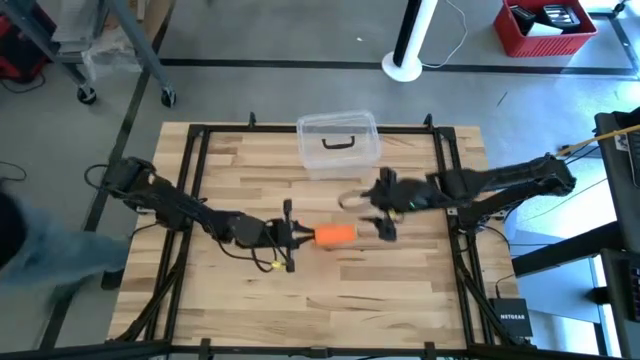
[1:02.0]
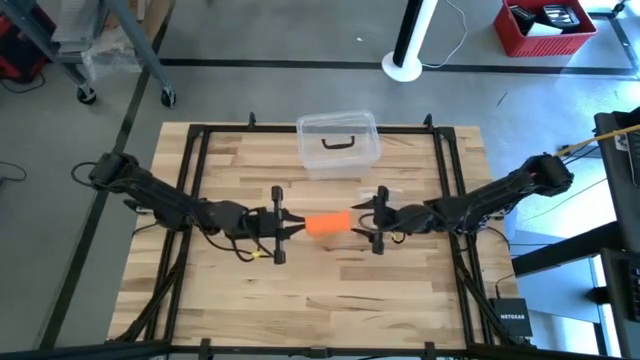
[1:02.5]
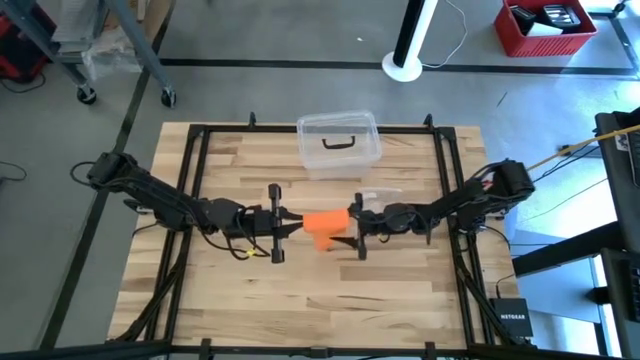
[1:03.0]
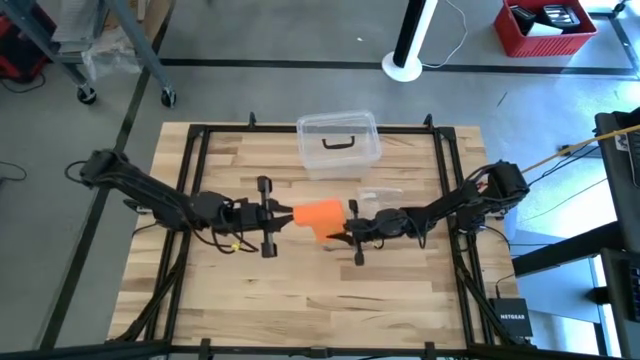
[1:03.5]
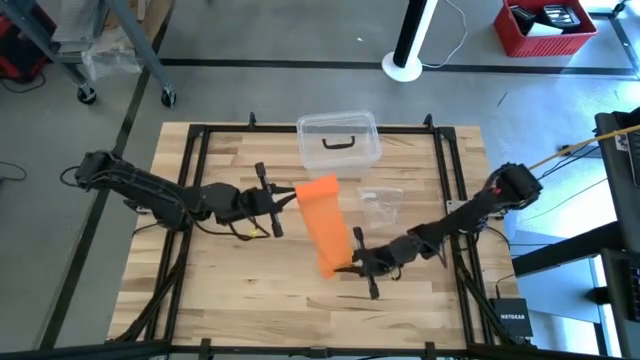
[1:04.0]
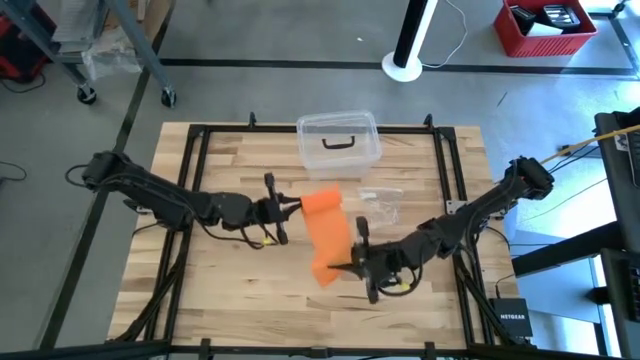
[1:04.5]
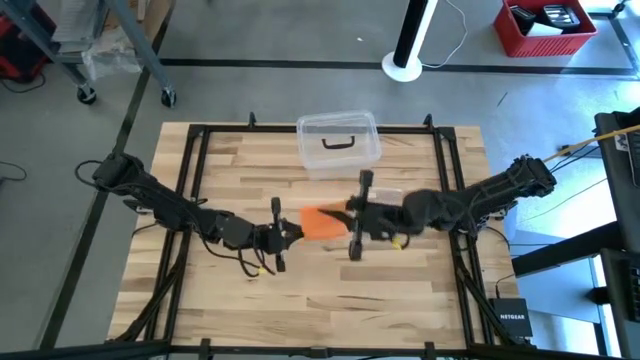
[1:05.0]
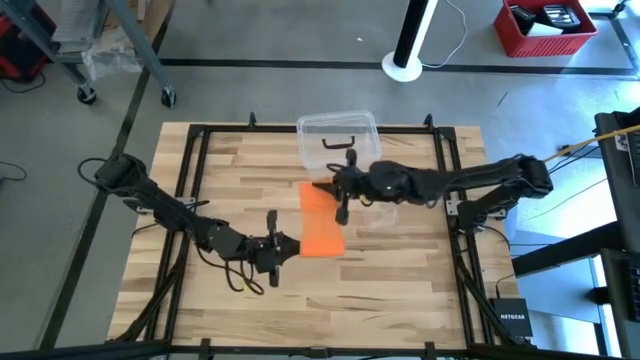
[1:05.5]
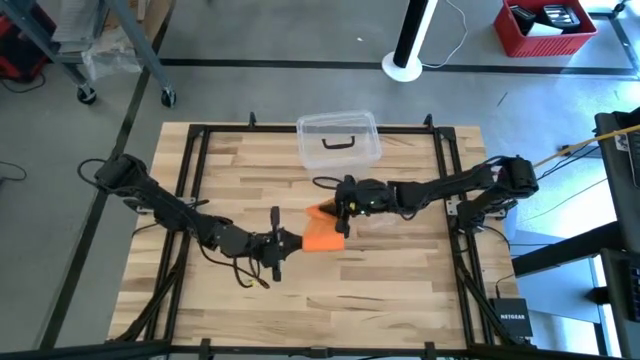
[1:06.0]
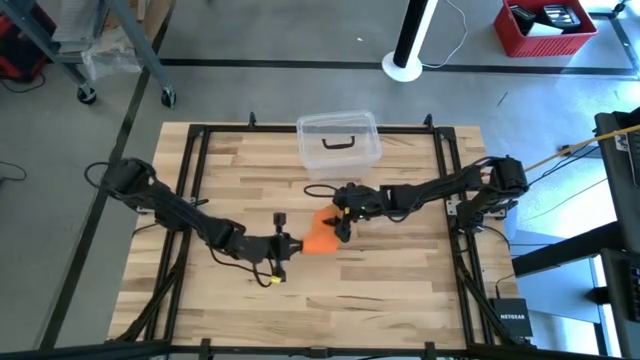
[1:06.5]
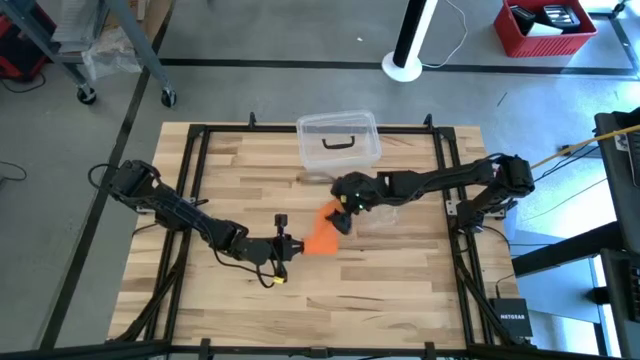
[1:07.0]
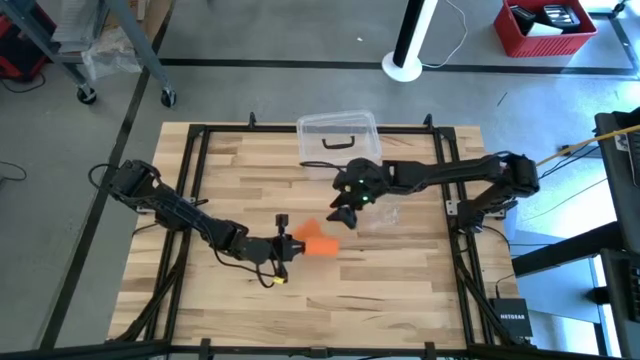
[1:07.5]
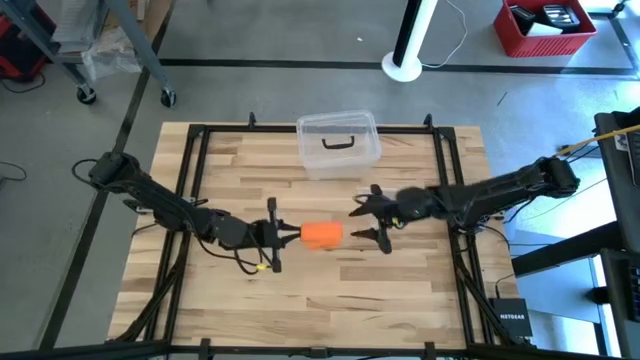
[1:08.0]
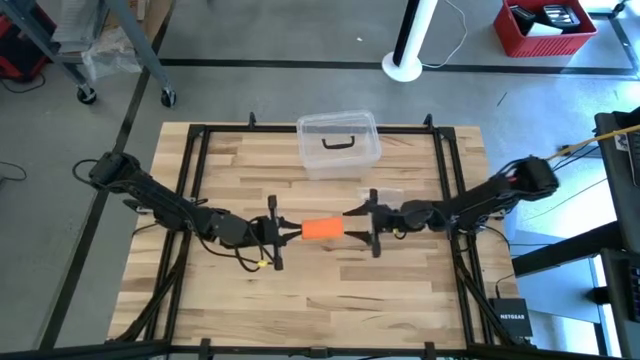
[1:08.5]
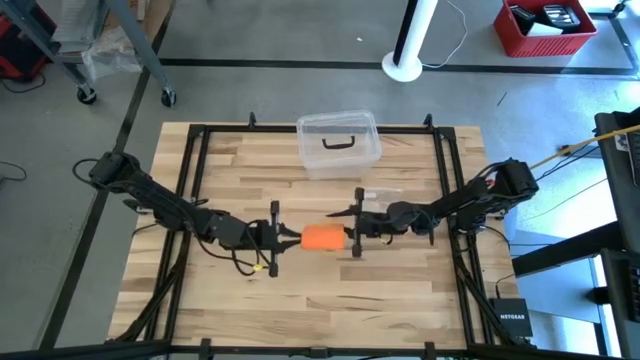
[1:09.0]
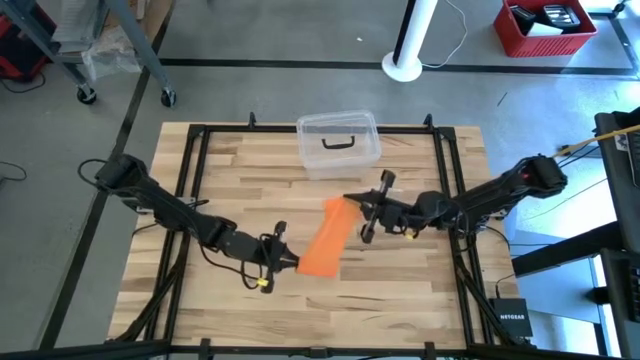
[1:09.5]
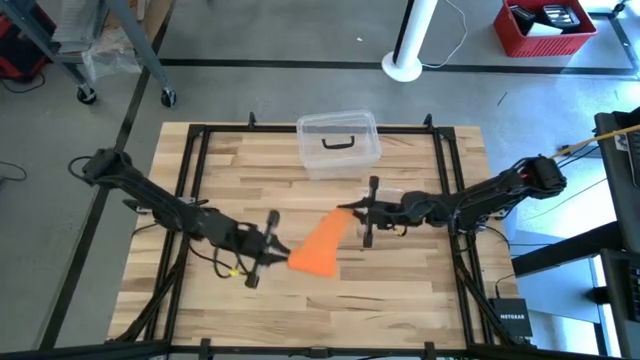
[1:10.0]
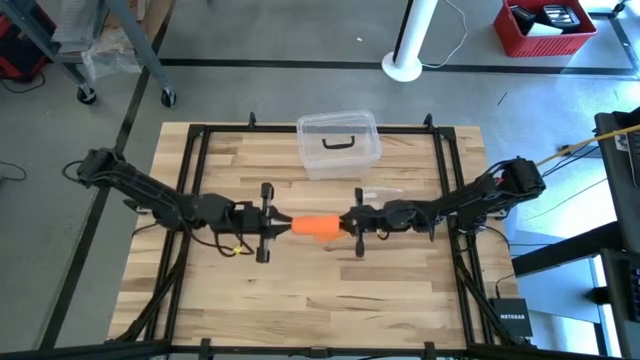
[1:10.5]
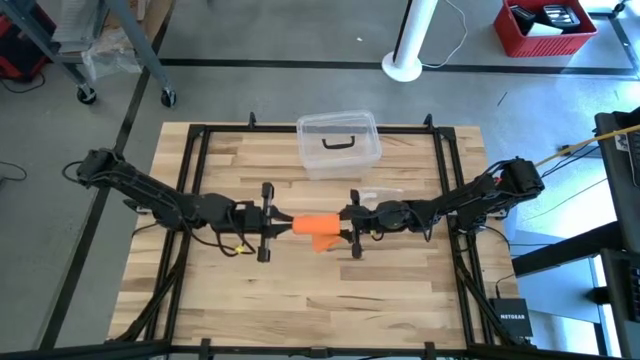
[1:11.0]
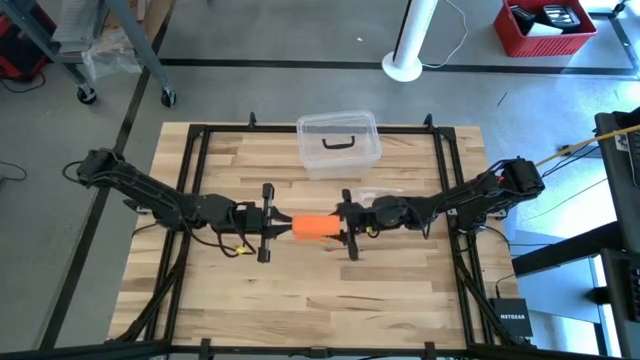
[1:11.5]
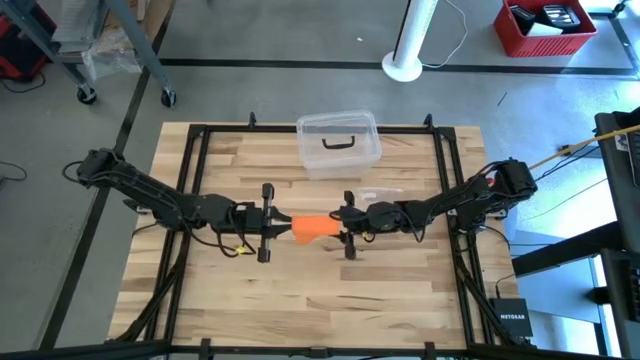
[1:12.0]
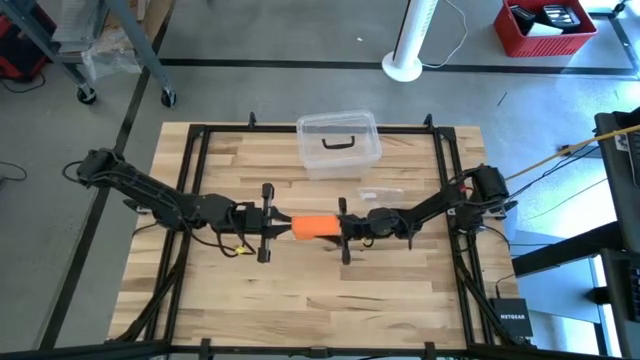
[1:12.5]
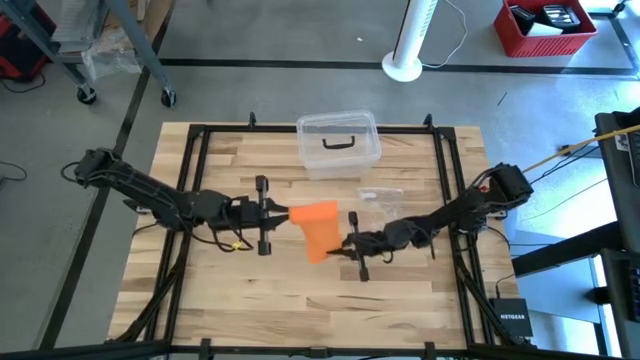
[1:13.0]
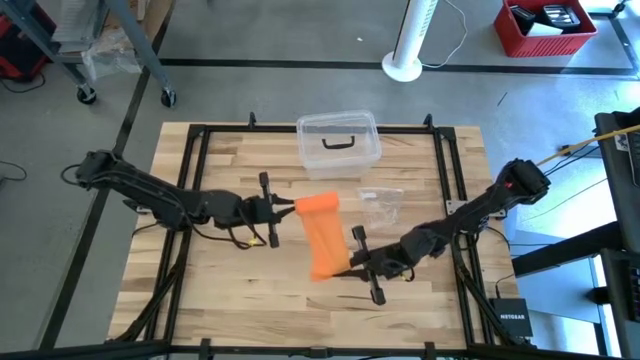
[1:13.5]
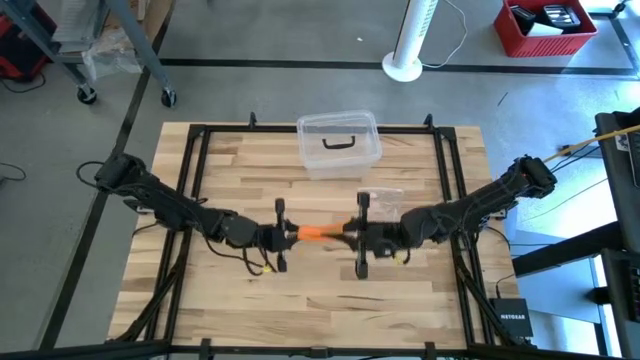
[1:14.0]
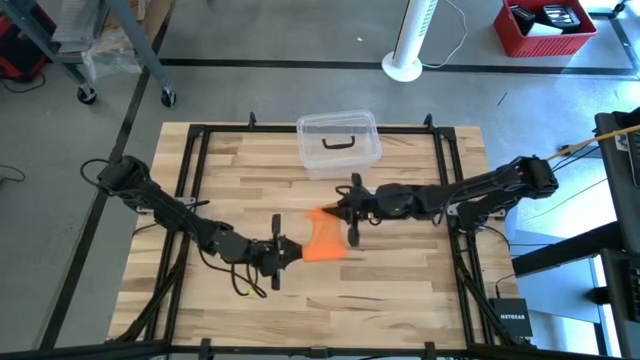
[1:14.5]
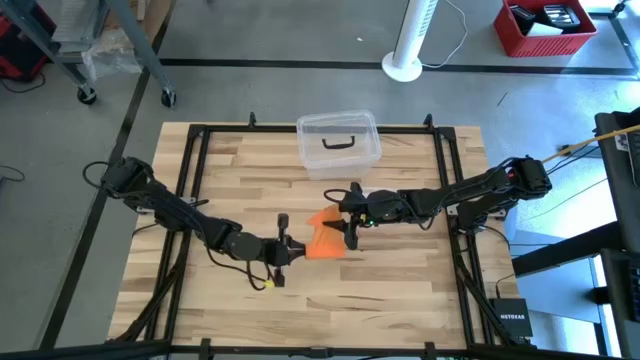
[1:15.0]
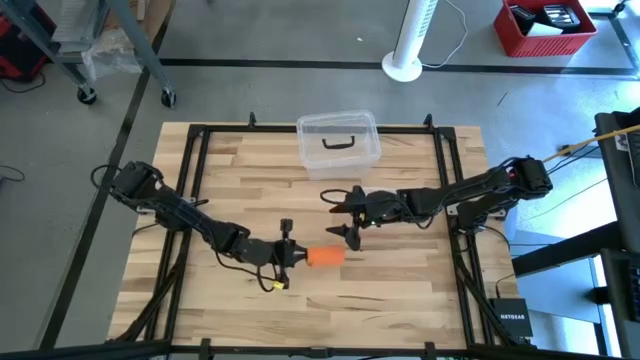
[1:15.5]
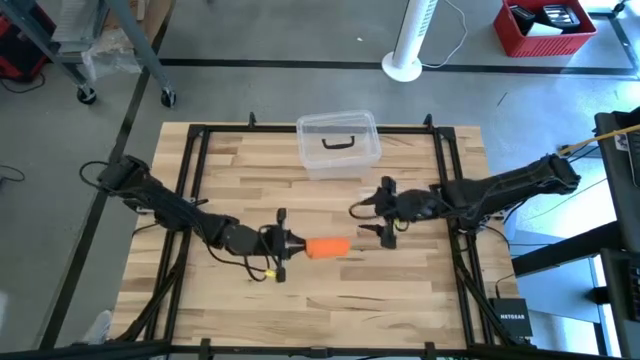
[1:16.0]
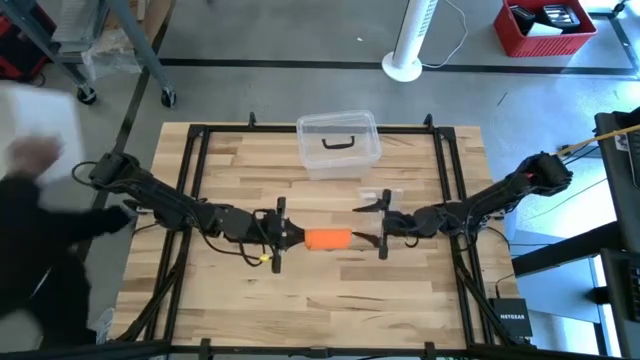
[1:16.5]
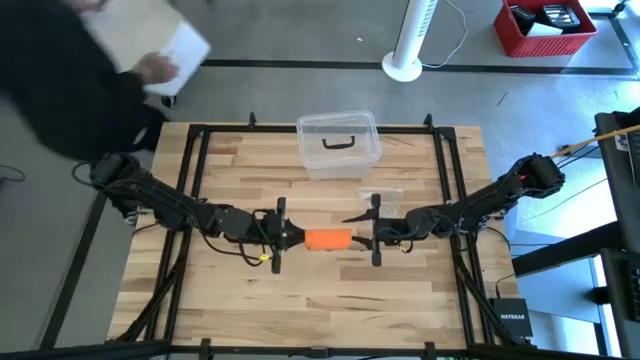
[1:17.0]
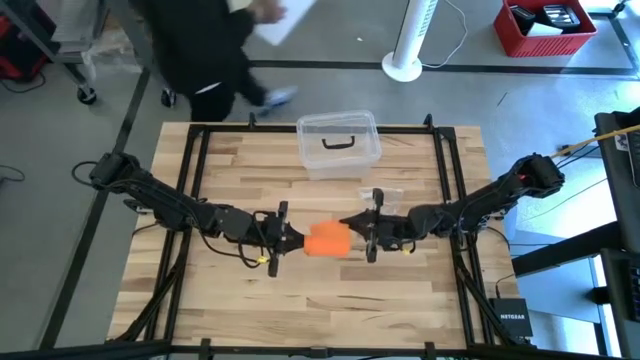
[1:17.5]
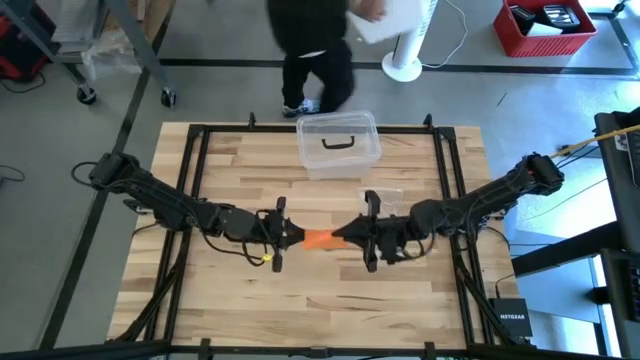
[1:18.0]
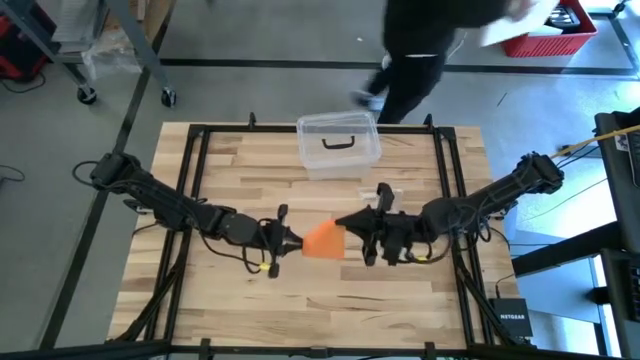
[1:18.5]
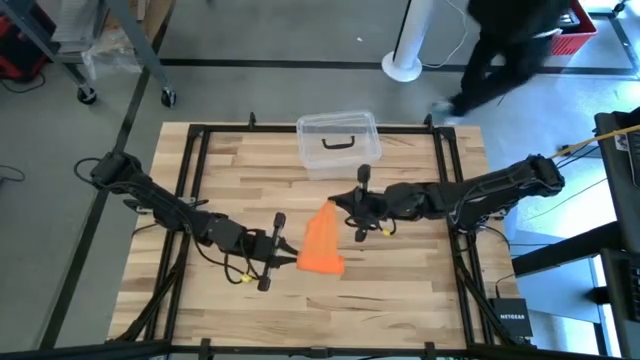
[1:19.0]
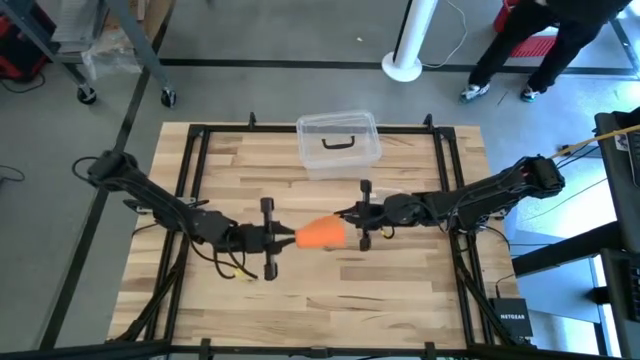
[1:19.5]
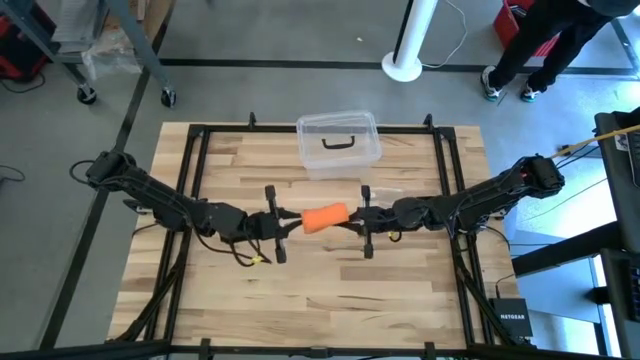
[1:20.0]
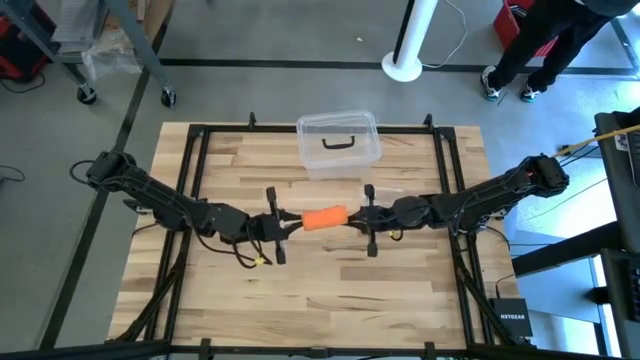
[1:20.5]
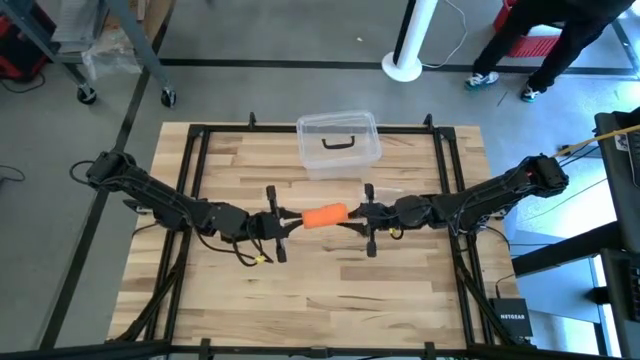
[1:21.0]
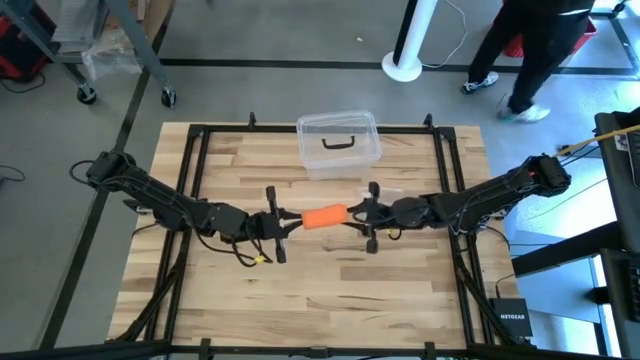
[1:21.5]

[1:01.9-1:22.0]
Task: Roll bandage
Roll the orange bandage
